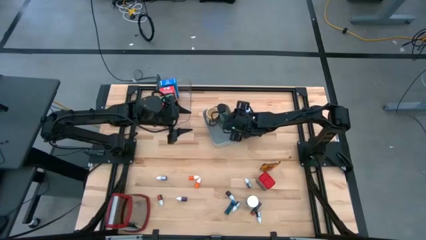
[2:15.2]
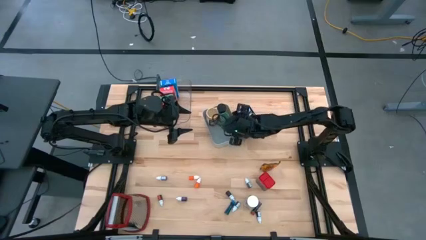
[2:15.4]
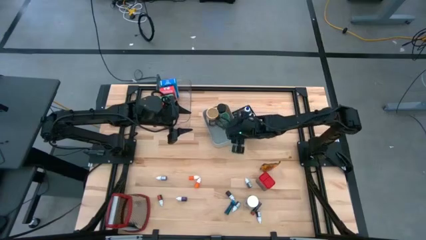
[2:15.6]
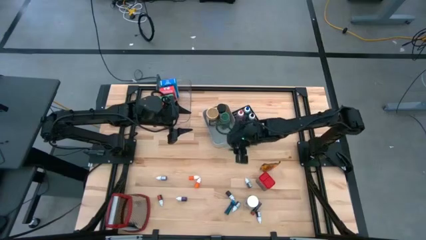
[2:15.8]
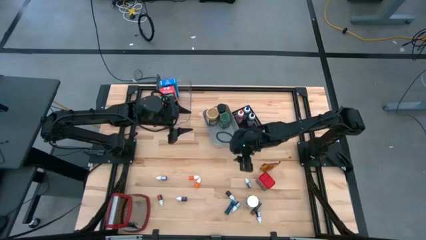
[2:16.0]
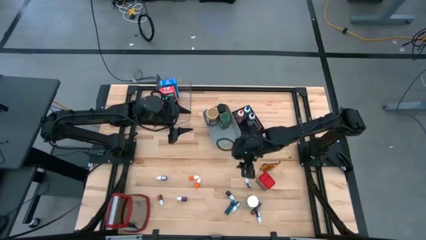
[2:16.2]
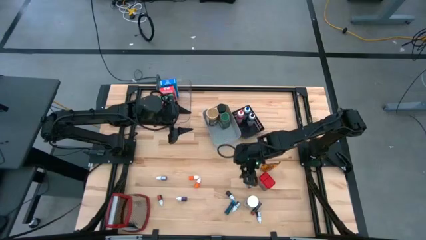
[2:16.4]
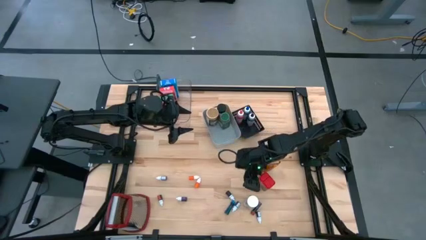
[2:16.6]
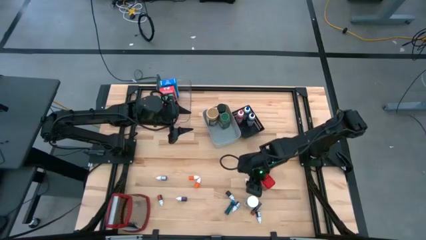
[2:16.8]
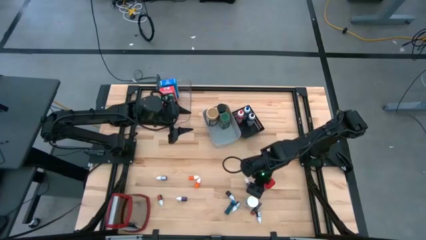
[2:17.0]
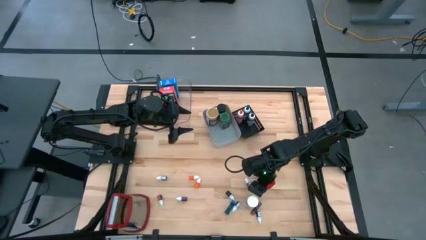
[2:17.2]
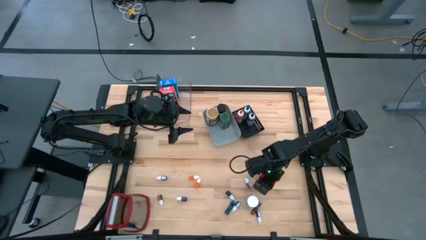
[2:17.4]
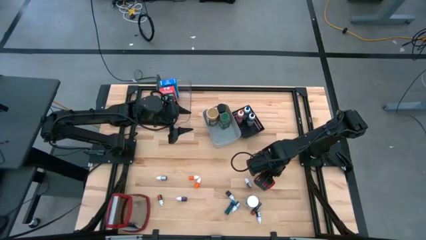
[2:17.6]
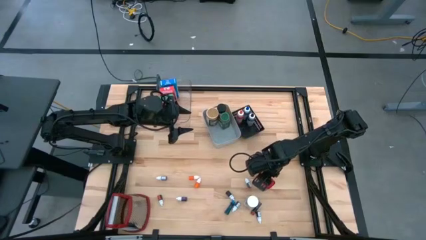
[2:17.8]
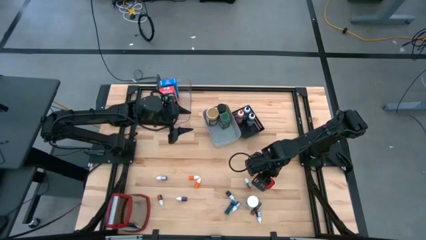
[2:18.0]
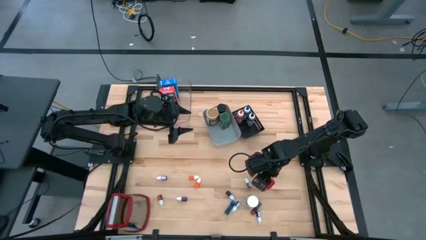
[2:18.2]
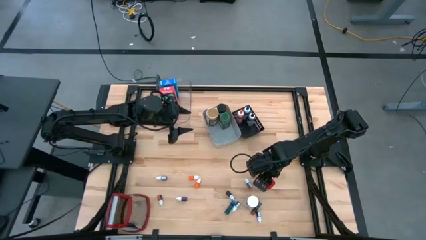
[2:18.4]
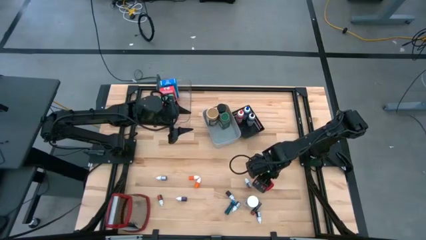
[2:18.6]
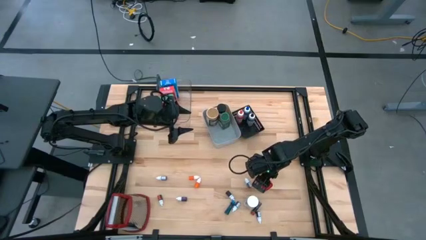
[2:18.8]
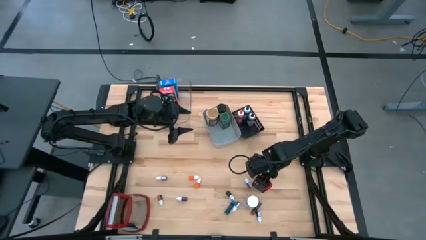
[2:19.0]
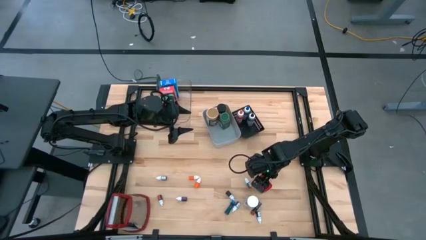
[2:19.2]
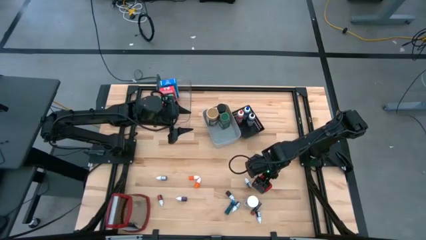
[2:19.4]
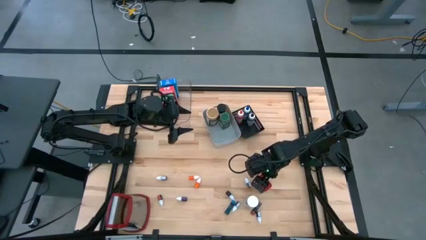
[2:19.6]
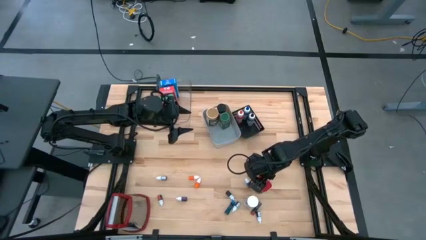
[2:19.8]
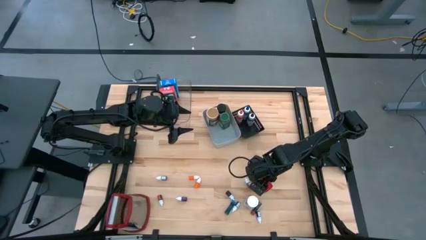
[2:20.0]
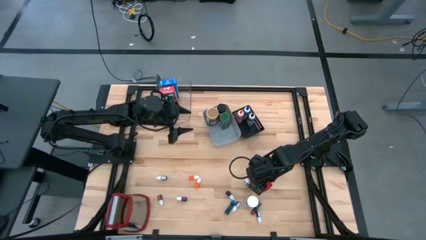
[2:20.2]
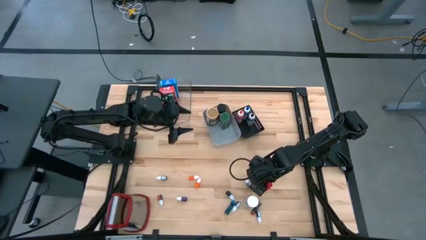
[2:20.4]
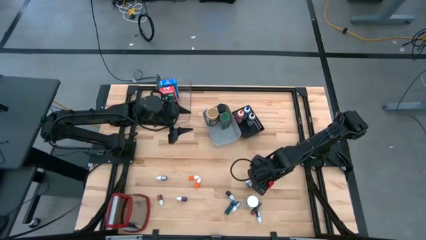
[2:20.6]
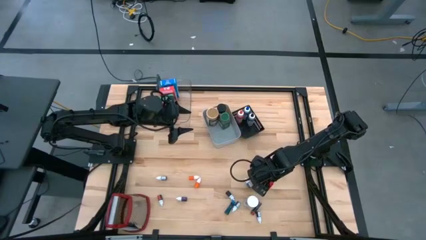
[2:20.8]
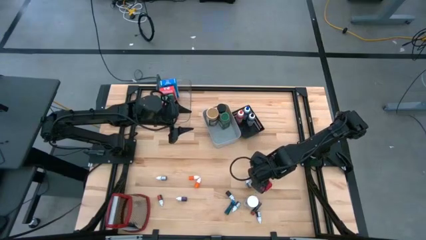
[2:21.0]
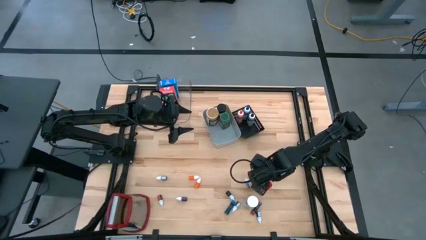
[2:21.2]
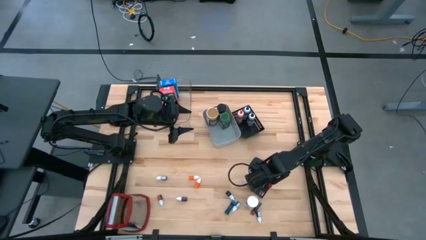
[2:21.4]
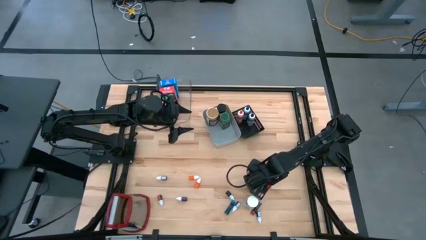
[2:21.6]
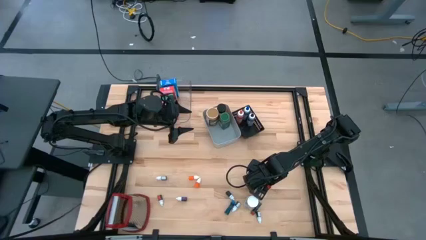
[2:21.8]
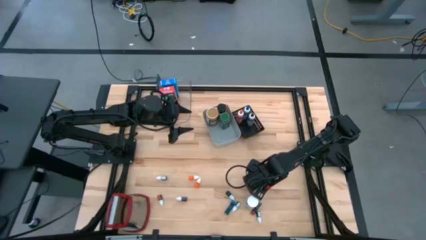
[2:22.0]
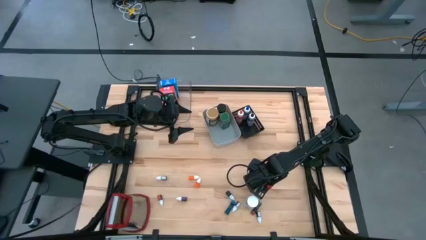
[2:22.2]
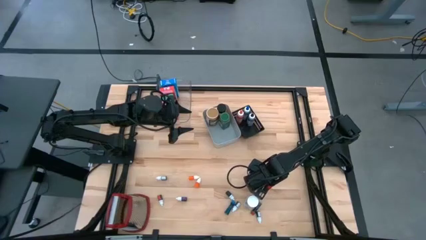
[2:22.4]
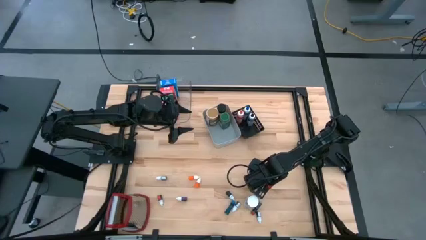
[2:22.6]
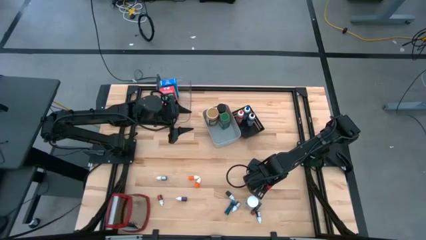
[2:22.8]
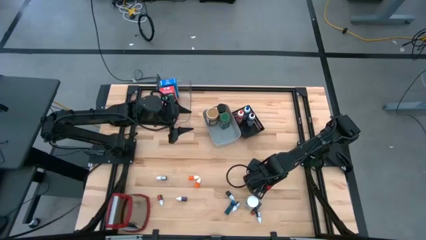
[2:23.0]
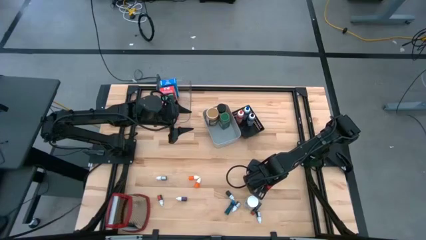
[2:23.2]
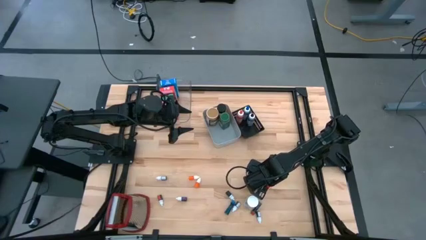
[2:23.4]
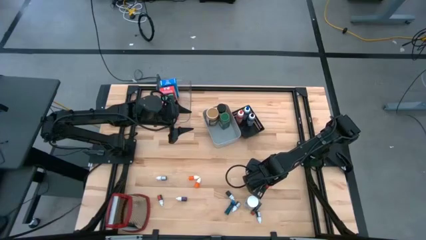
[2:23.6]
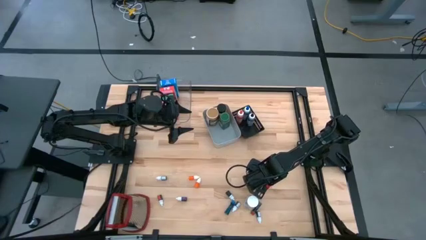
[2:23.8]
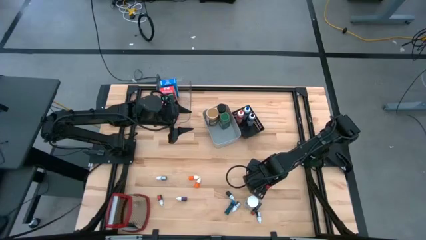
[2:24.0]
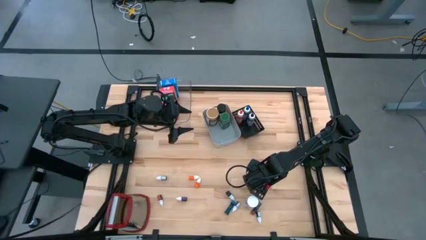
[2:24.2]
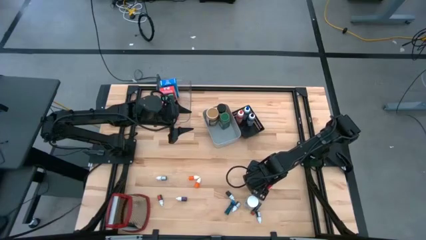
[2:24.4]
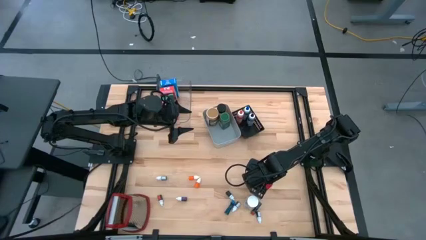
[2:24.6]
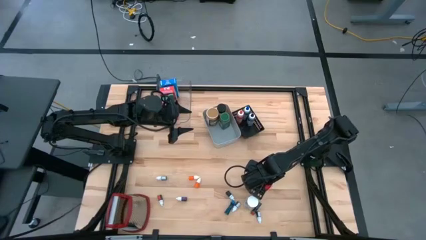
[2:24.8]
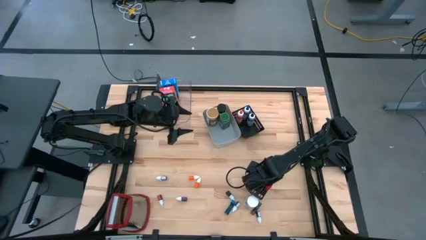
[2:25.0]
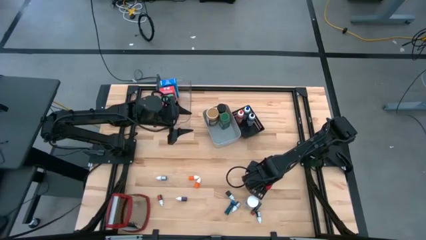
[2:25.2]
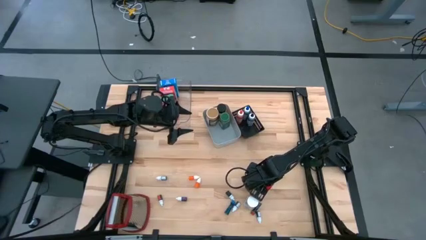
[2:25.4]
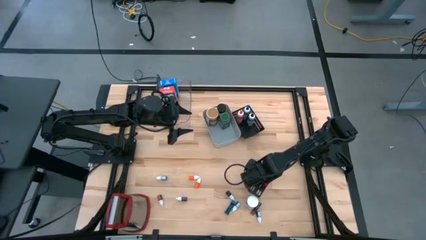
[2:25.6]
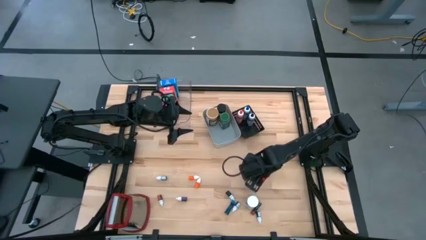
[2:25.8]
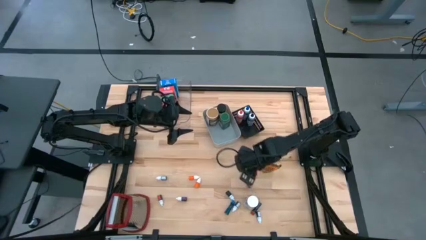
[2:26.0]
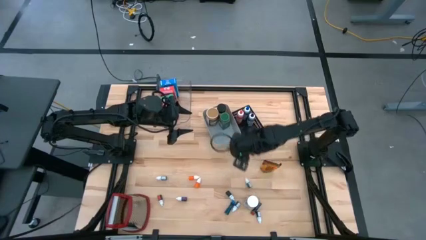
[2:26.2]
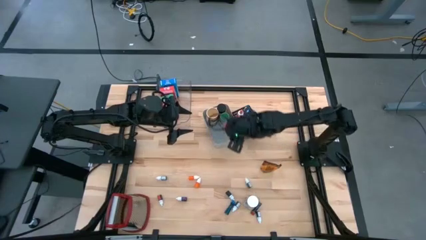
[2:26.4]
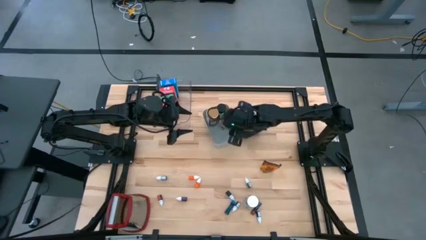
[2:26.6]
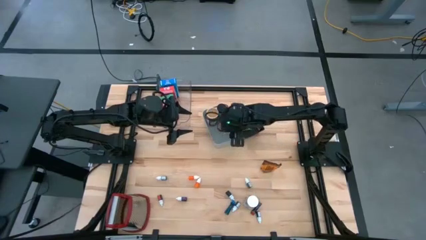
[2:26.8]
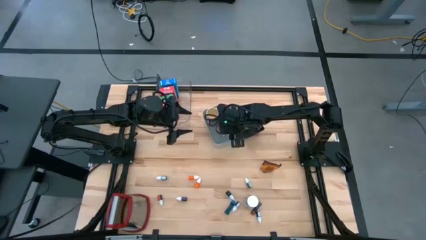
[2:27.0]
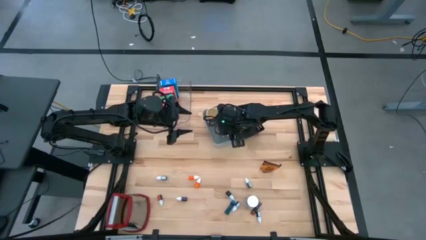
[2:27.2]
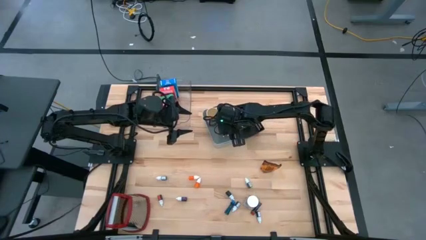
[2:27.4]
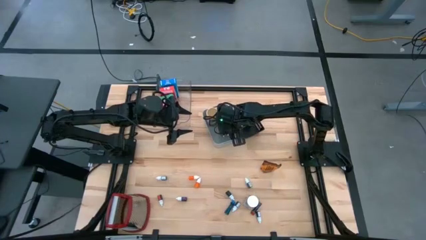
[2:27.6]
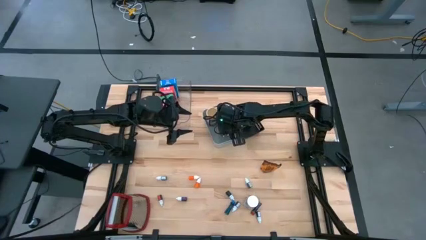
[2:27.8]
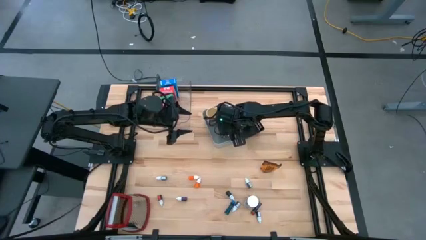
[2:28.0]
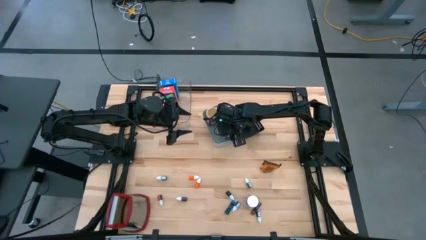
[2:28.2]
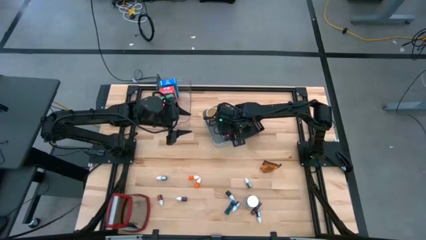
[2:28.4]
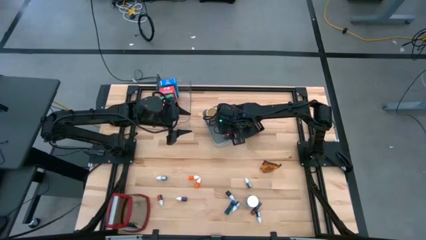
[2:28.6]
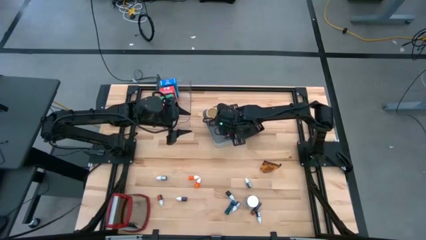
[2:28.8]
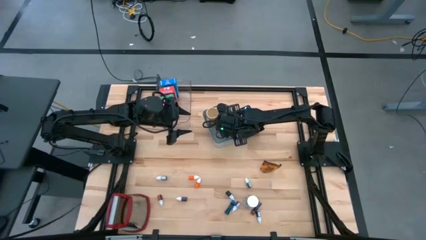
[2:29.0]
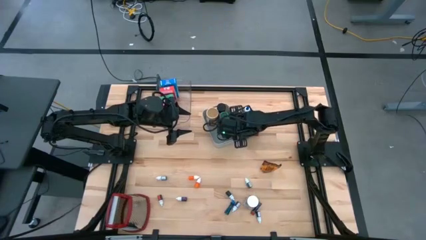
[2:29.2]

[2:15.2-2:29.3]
Task: Pick & Place Kitchen Items
Put the red seasoning can into the gray bin

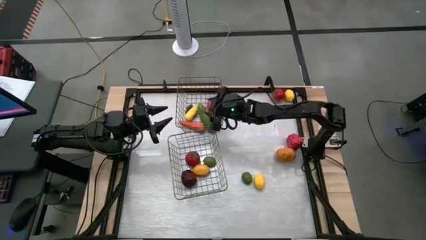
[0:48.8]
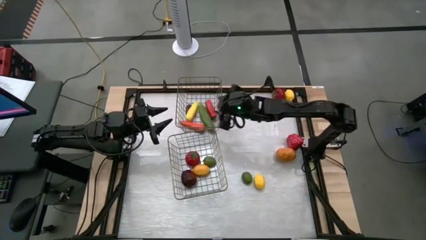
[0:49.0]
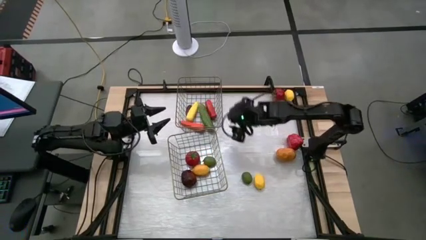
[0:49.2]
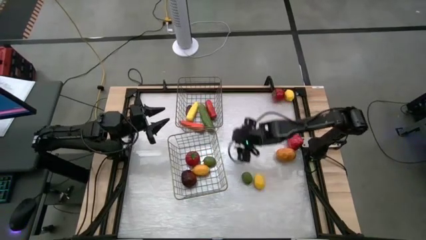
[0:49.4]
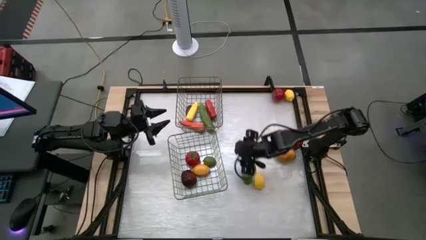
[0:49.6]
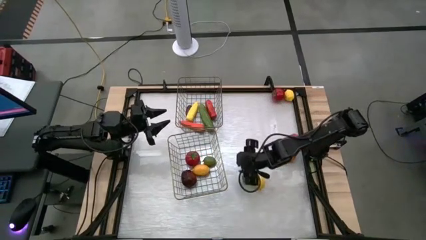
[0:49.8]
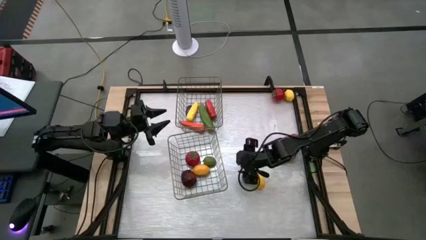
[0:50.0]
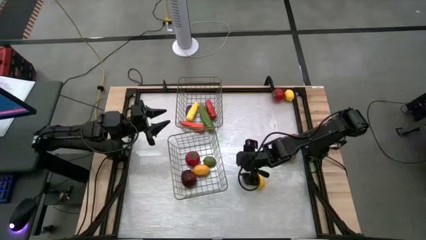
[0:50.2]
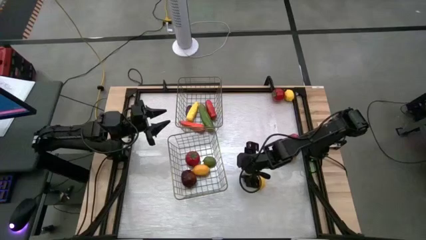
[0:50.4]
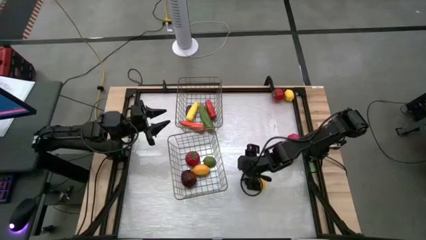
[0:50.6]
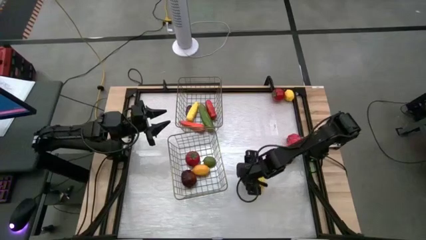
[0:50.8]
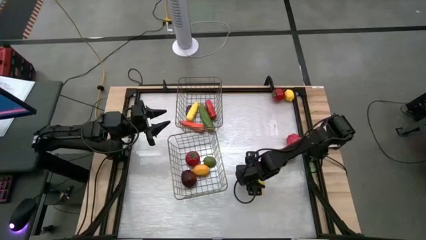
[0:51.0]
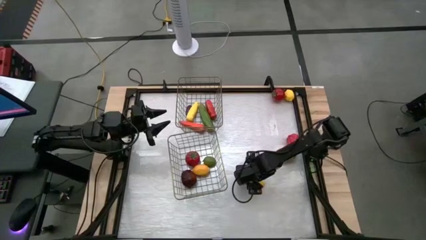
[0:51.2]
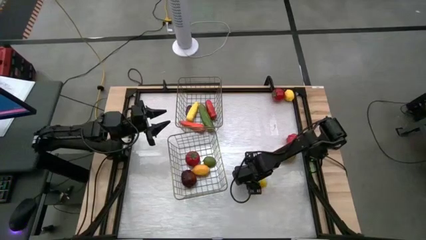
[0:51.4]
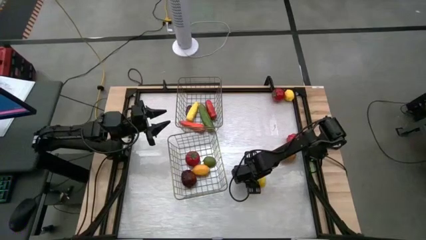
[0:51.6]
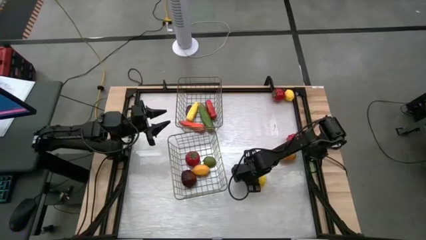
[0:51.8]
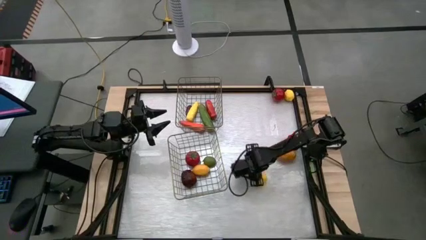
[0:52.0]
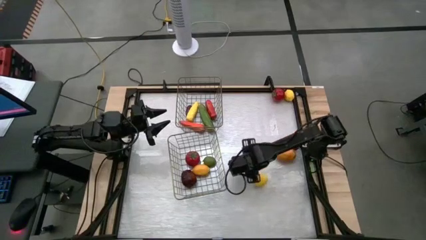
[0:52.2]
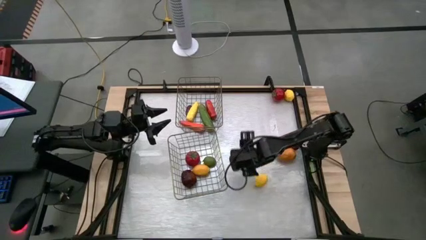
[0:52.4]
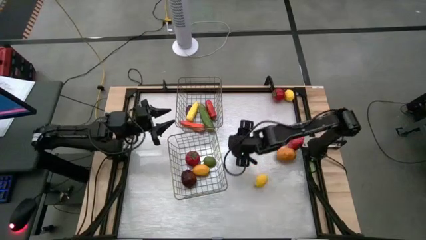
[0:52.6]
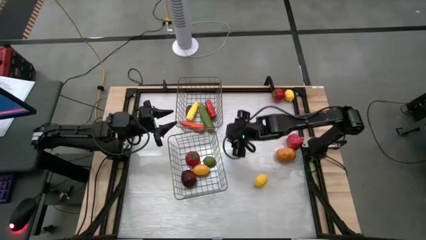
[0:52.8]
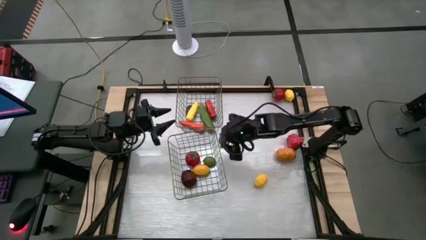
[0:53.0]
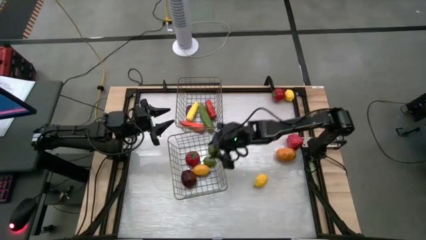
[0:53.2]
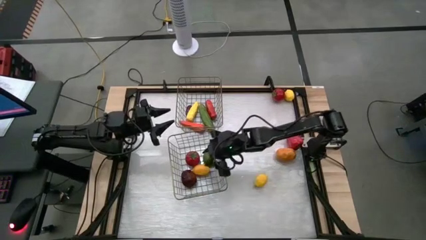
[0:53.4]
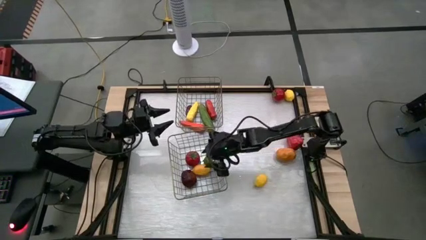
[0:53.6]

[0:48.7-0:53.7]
Task: Sort produce into baskets
Put the green lime into the bottom basket
